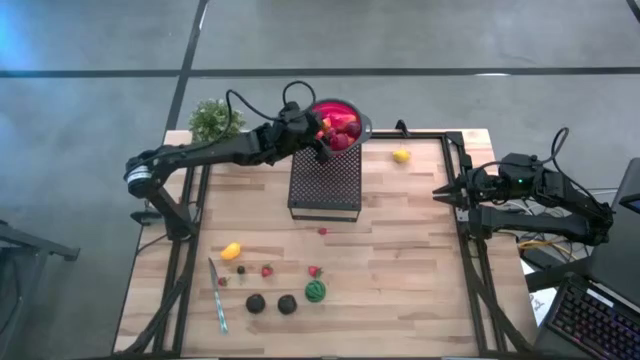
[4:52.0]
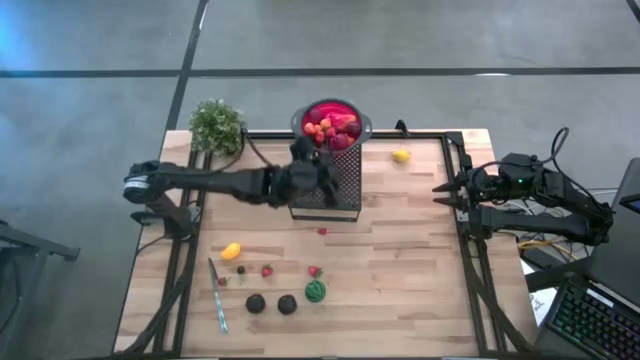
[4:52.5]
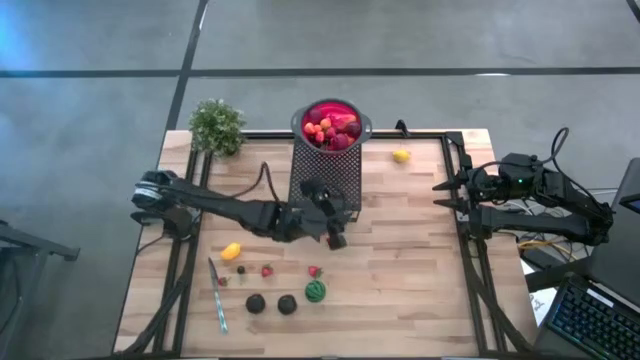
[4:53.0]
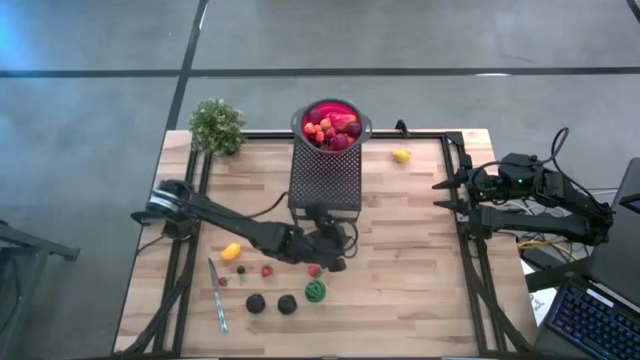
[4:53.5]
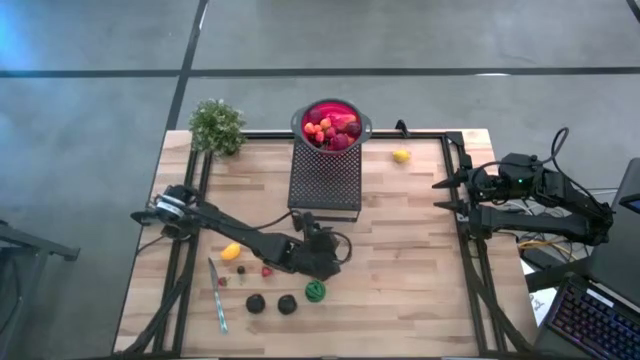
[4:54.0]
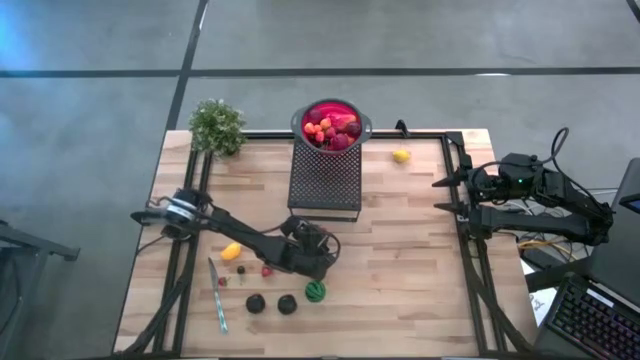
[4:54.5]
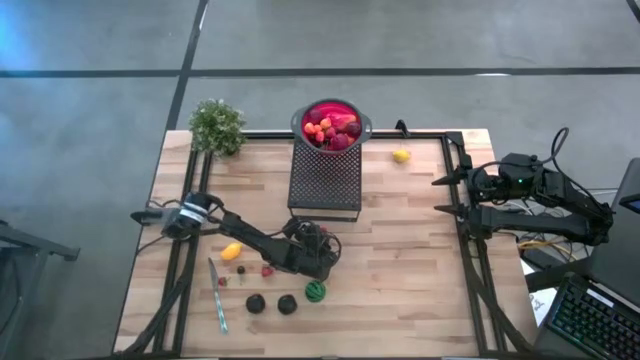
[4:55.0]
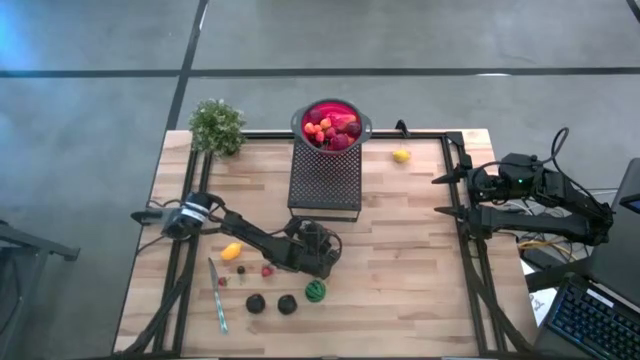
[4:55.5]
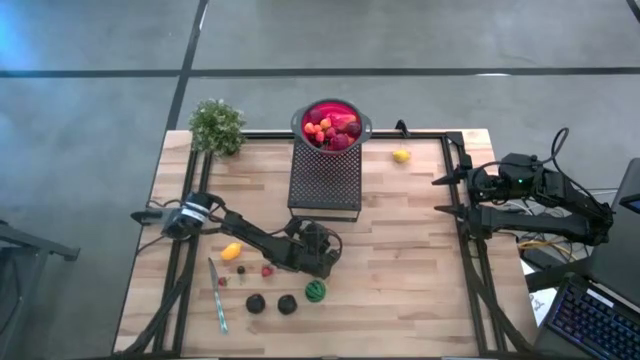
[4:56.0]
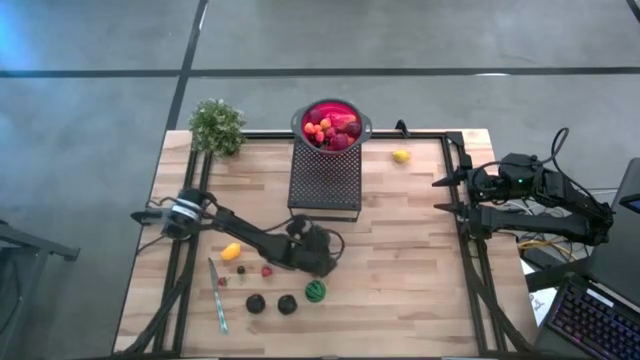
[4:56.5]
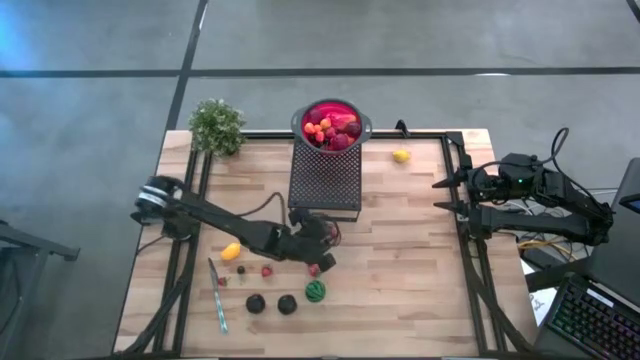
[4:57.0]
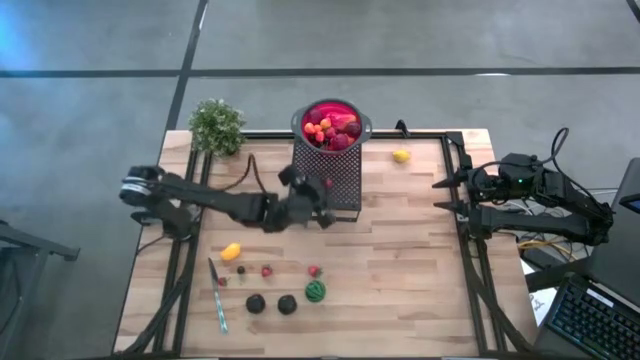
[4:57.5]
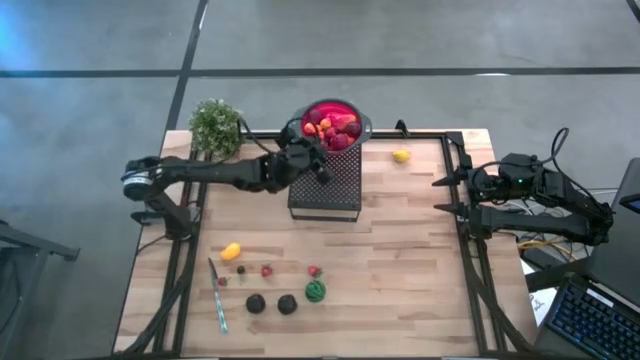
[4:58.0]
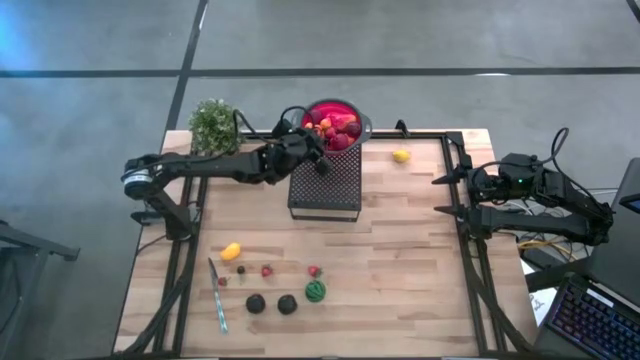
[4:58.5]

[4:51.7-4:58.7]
Task: Pick & Place Fruit
Put the raspberry into the red strainer bowl on the shelf

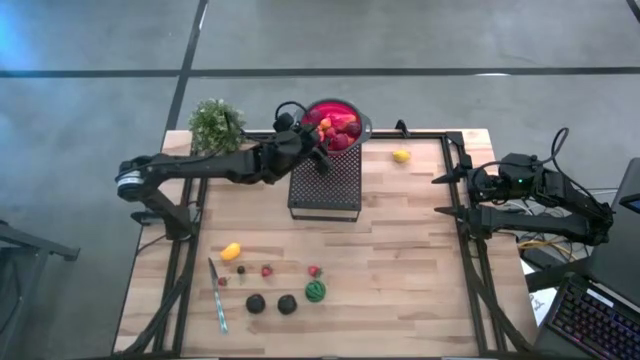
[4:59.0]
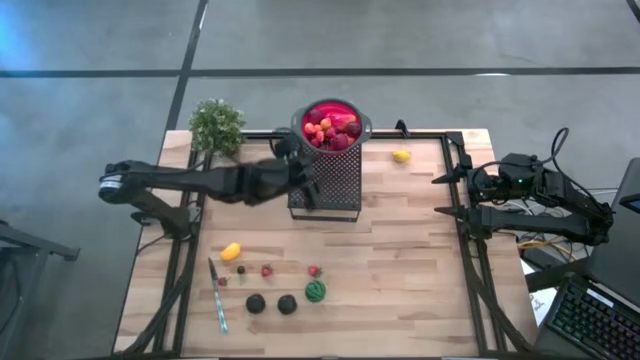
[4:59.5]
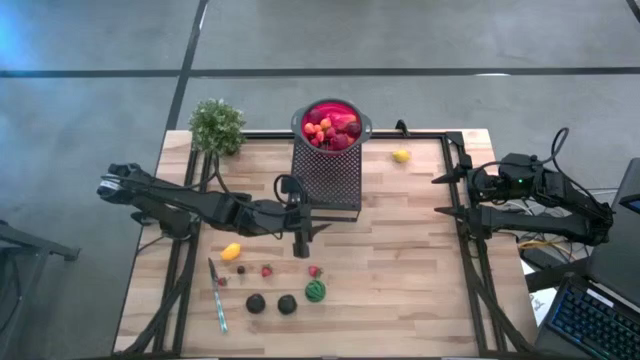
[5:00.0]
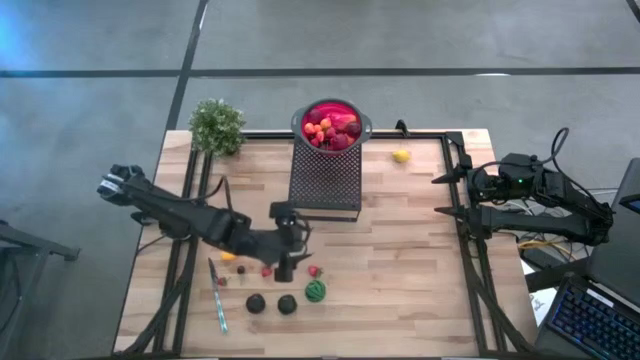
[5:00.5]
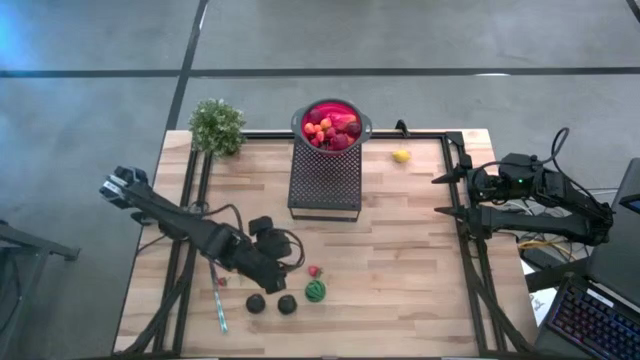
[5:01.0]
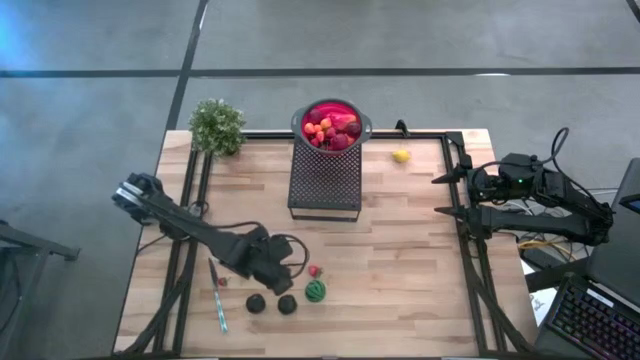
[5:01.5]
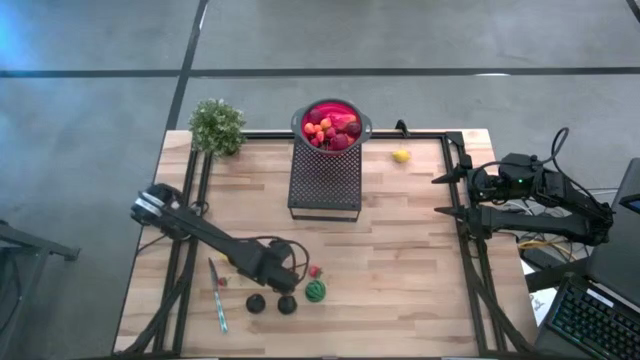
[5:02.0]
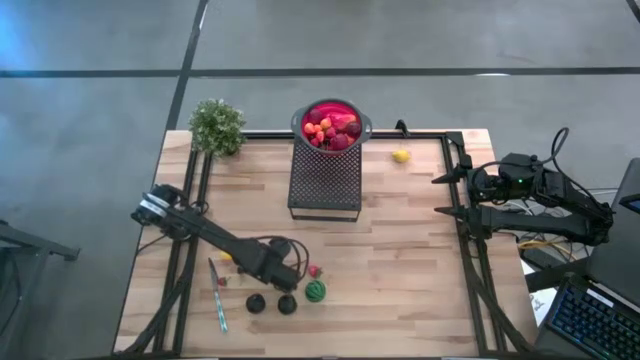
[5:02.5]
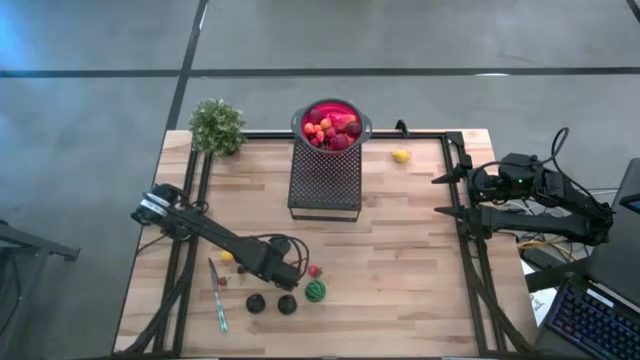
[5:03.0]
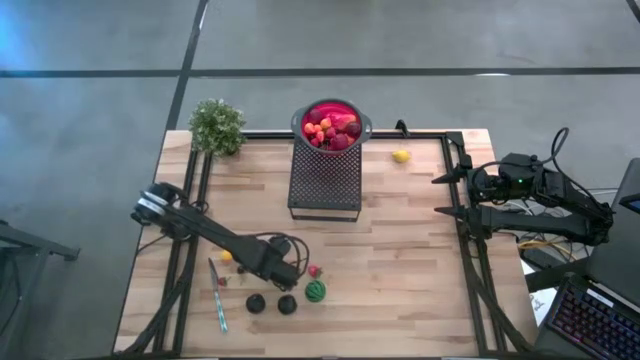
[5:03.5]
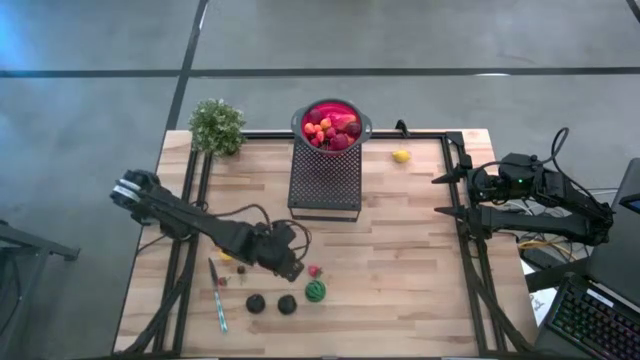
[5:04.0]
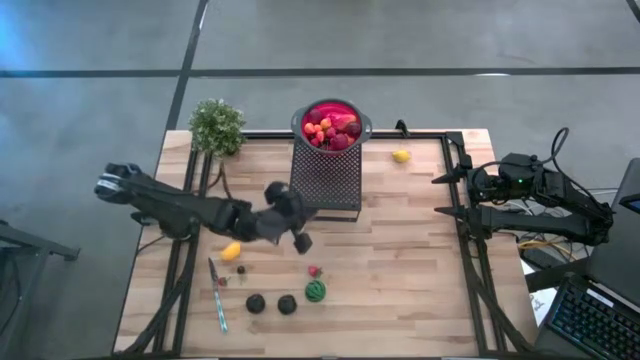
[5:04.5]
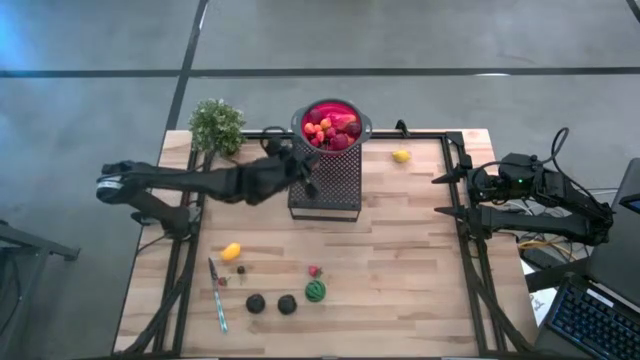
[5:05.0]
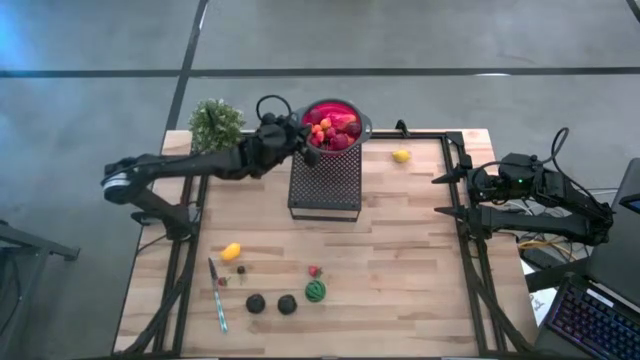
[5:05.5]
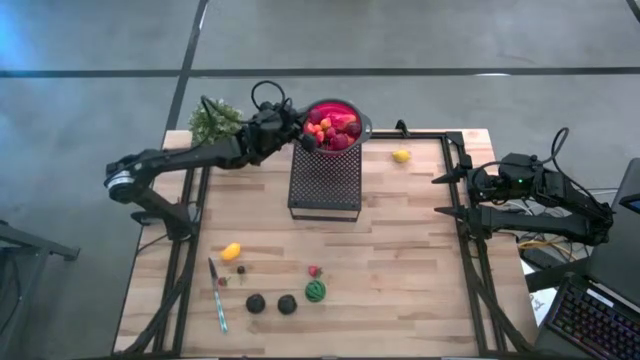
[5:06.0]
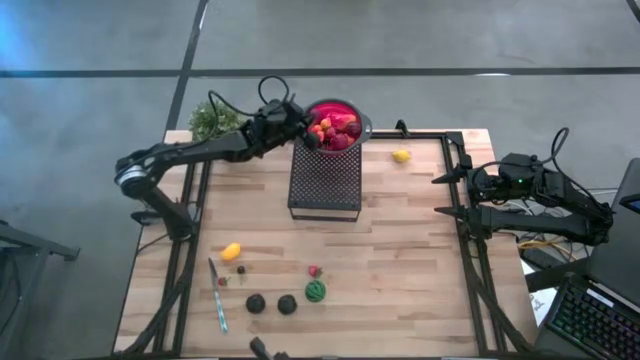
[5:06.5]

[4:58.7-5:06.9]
Put the strawberry into the red strainer bowl on the shelf

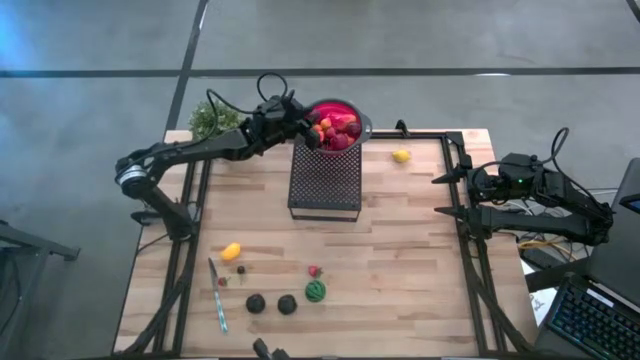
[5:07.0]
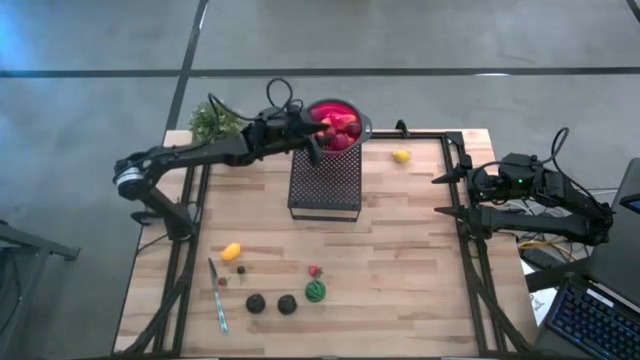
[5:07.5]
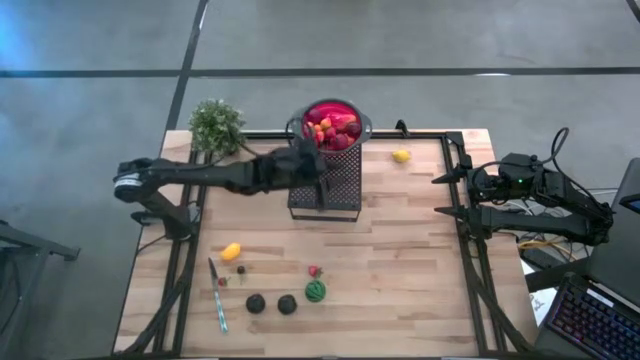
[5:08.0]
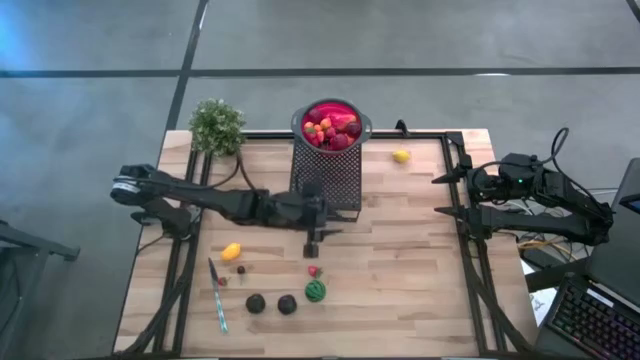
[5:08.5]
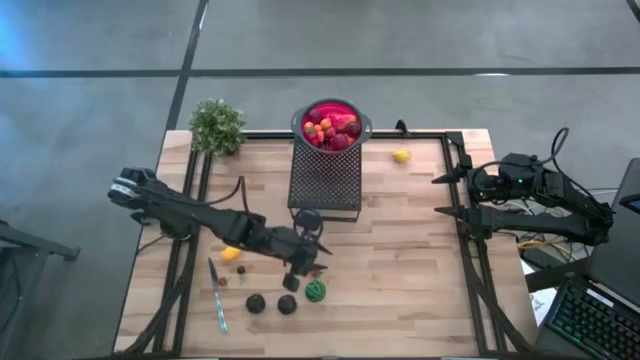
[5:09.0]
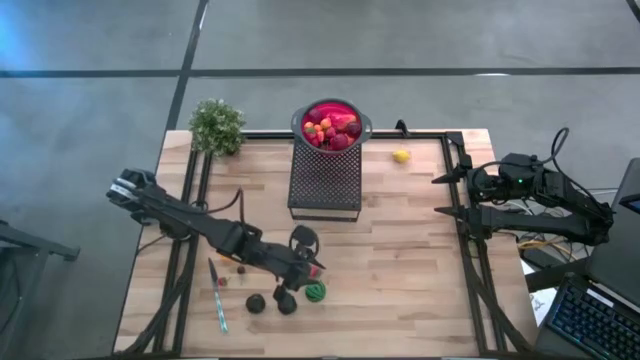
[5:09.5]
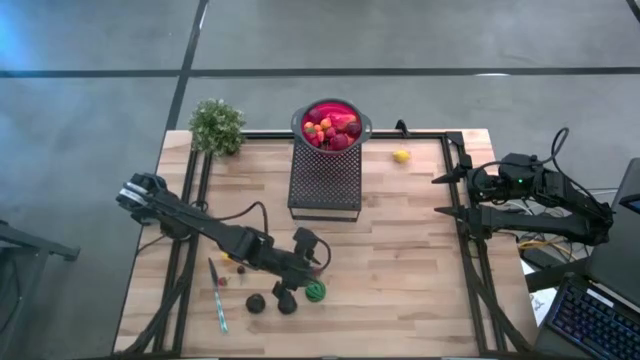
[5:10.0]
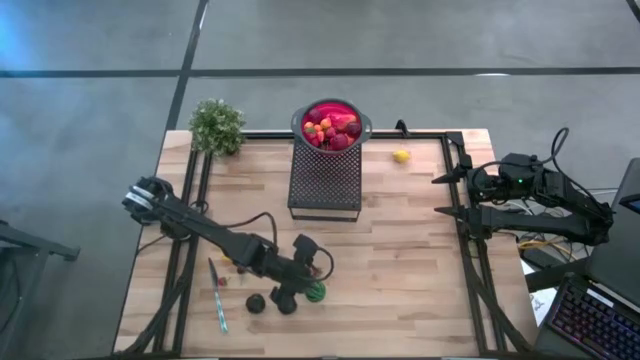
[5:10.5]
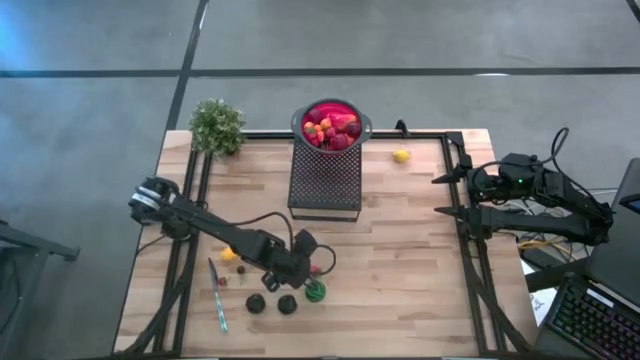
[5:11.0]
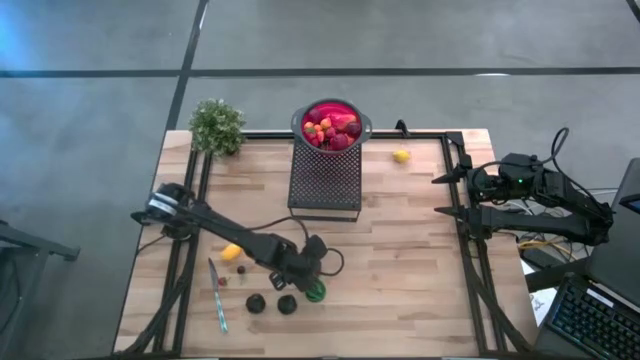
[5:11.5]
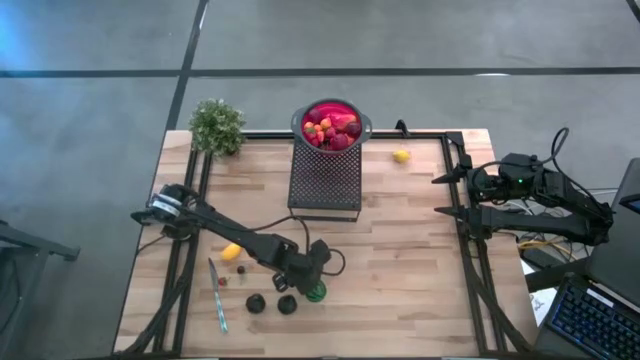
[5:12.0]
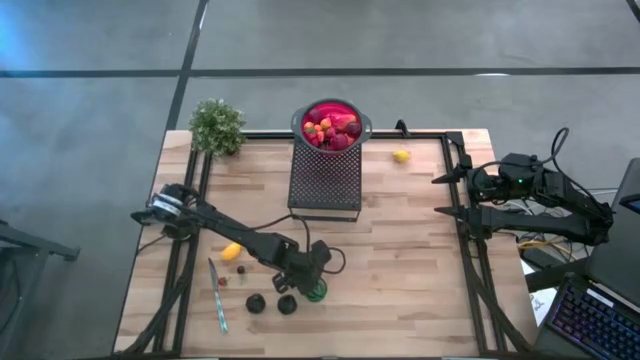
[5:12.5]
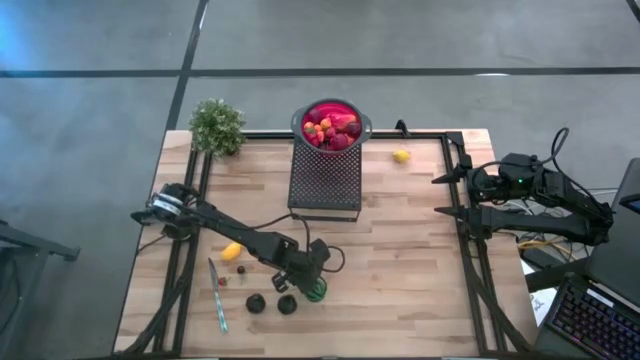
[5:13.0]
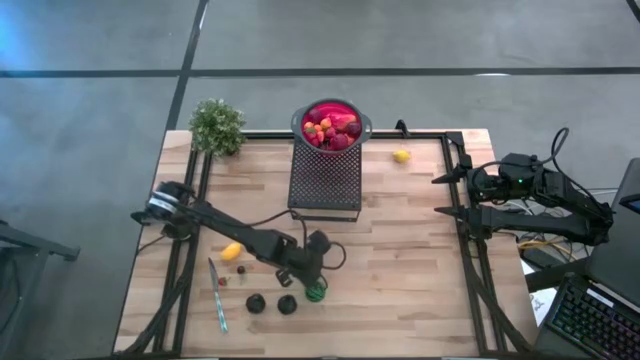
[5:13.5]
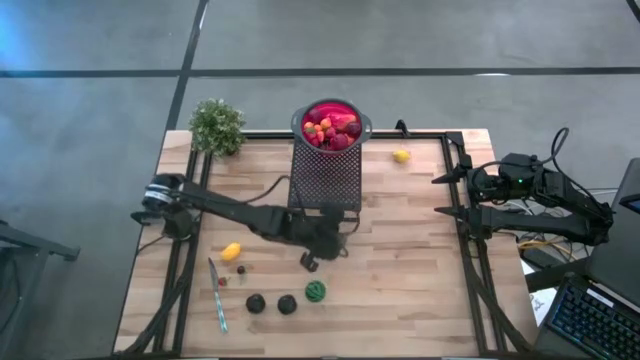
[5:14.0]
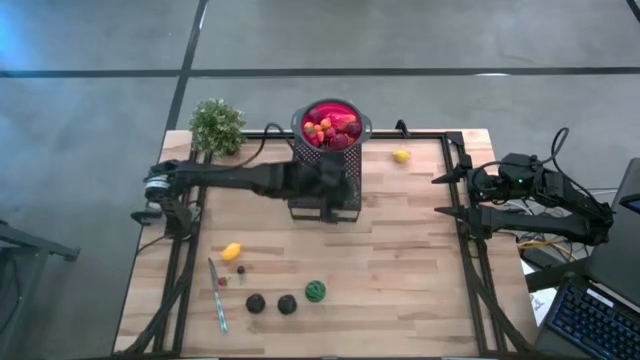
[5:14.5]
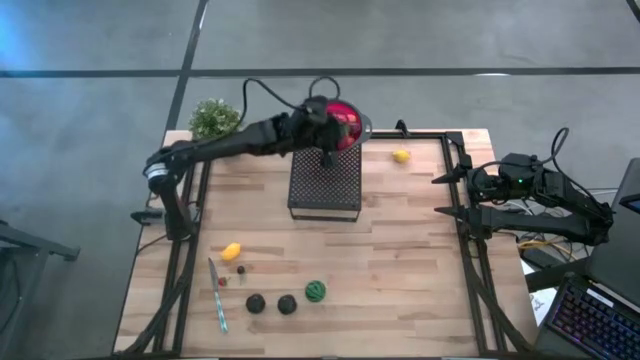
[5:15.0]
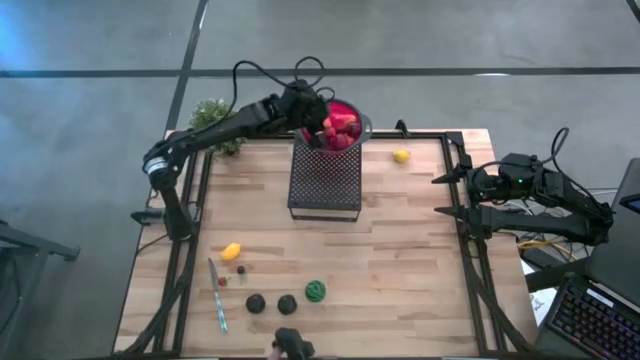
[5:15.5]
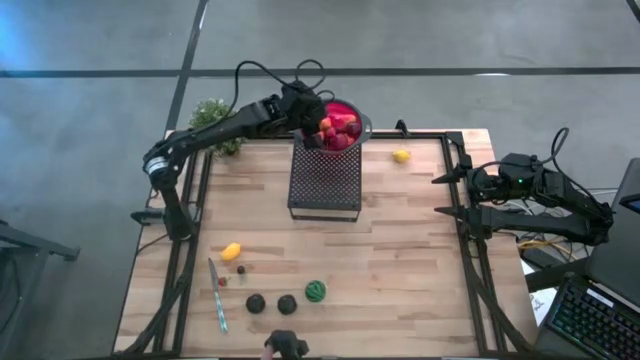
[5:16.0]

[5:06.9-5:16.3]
Put the strawberry into the red strainer bowl on the shelf
